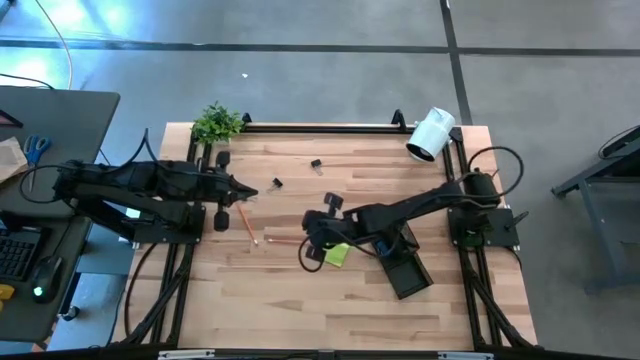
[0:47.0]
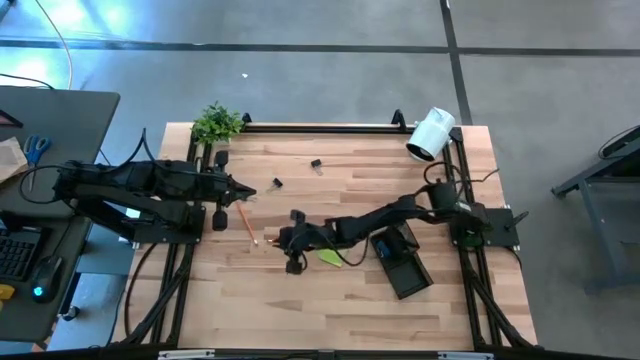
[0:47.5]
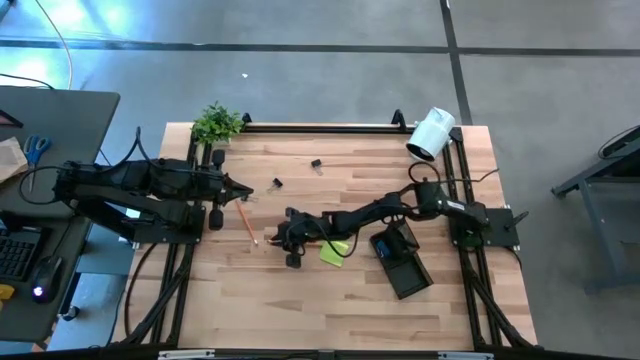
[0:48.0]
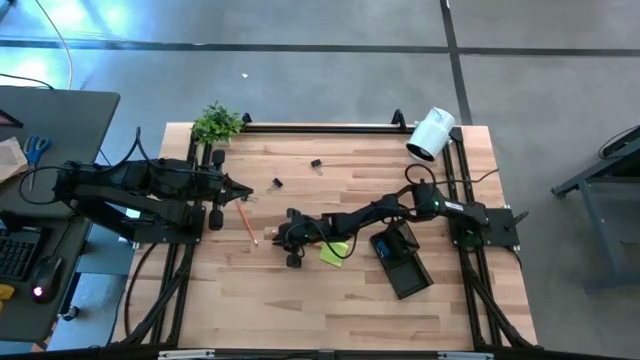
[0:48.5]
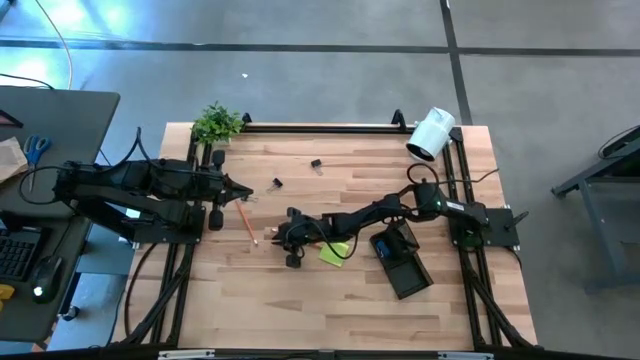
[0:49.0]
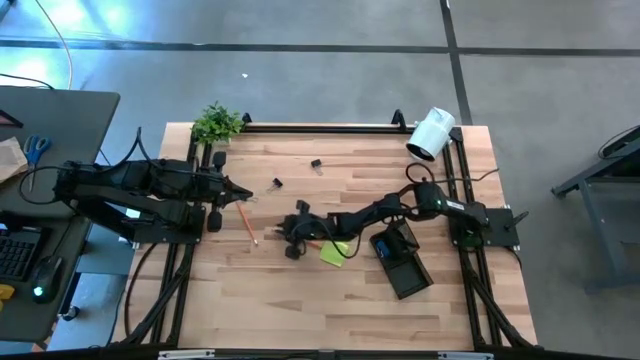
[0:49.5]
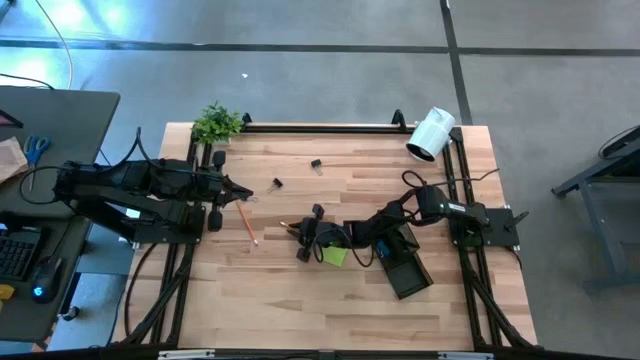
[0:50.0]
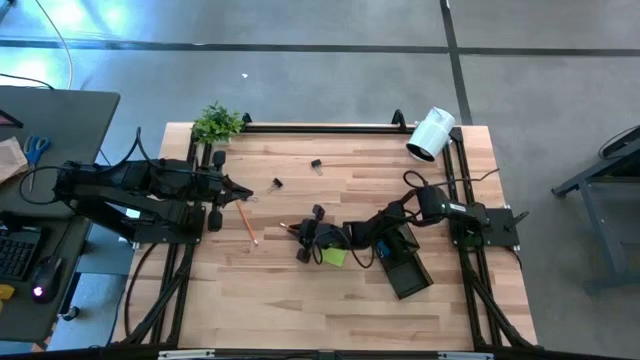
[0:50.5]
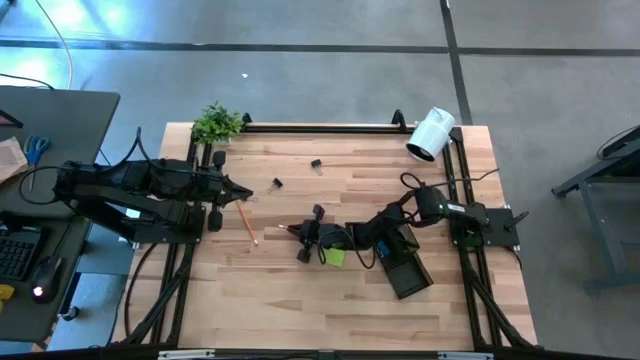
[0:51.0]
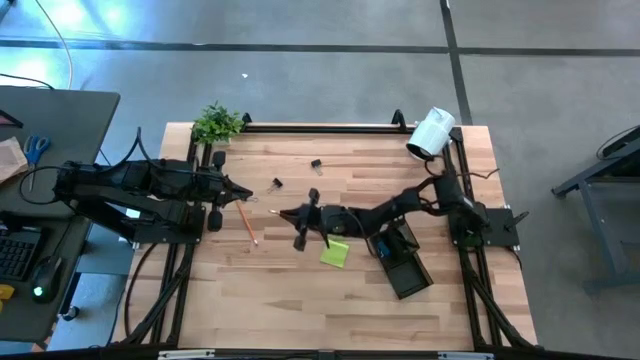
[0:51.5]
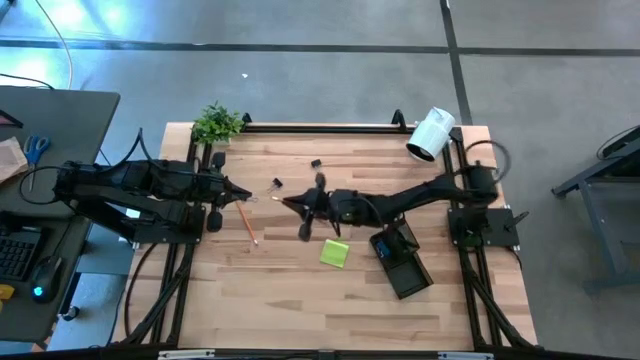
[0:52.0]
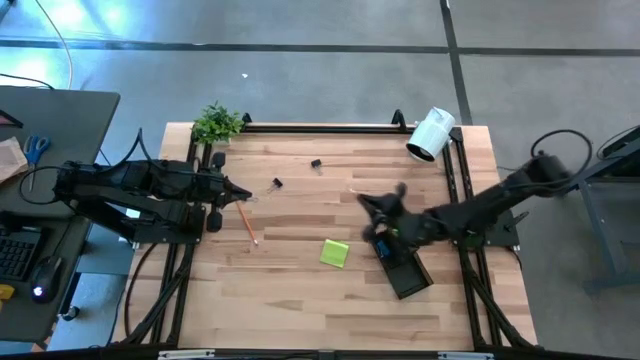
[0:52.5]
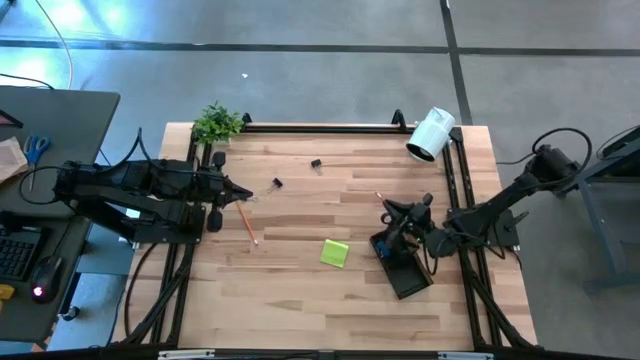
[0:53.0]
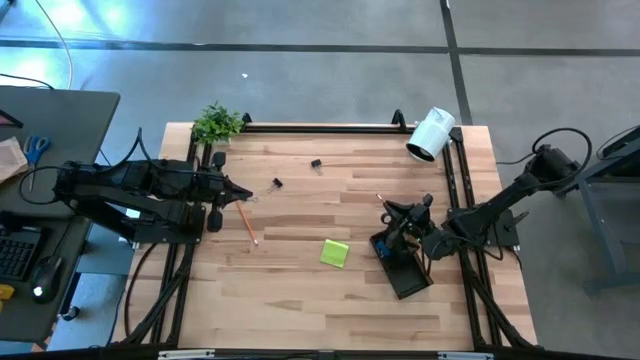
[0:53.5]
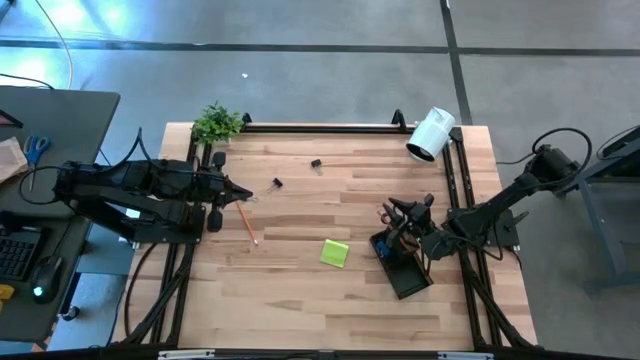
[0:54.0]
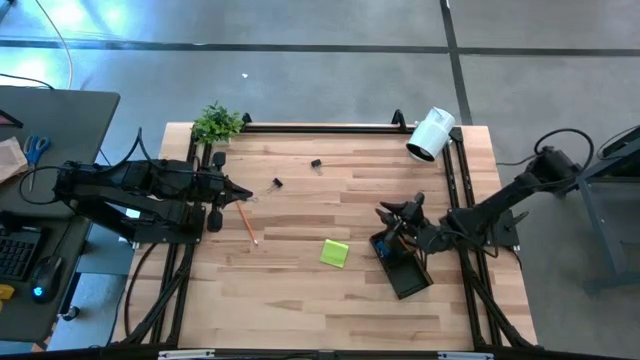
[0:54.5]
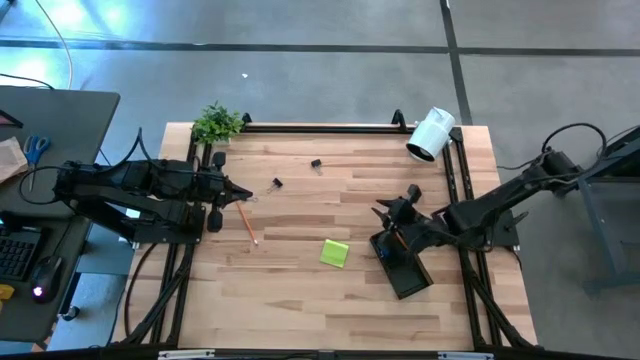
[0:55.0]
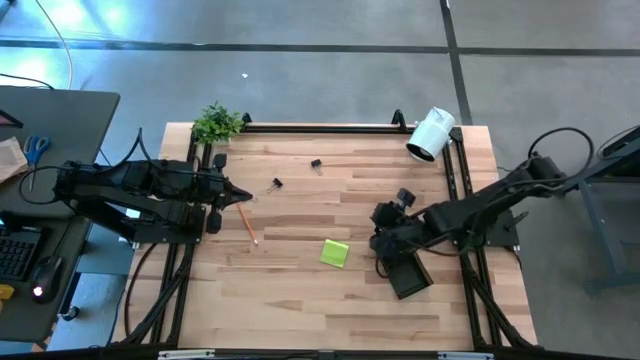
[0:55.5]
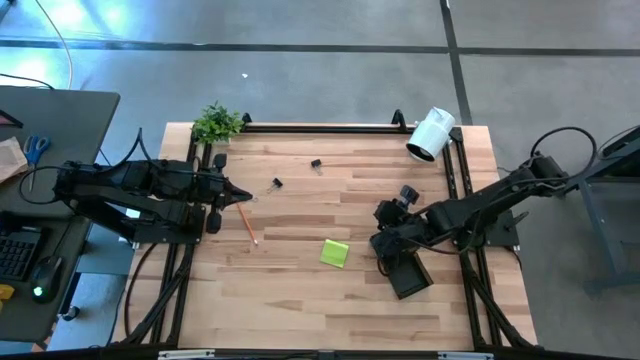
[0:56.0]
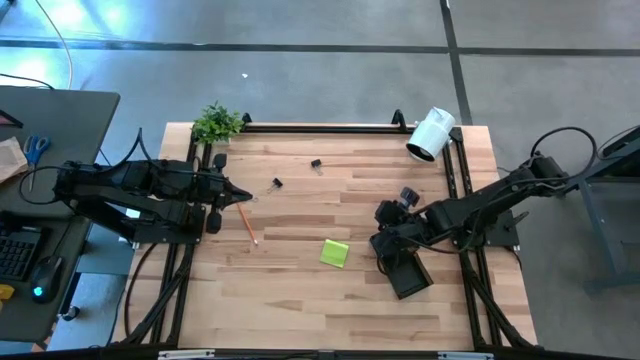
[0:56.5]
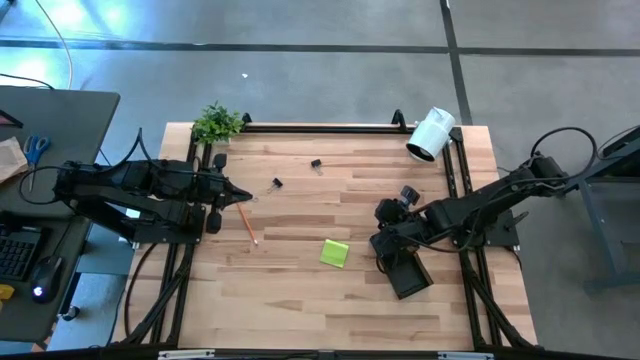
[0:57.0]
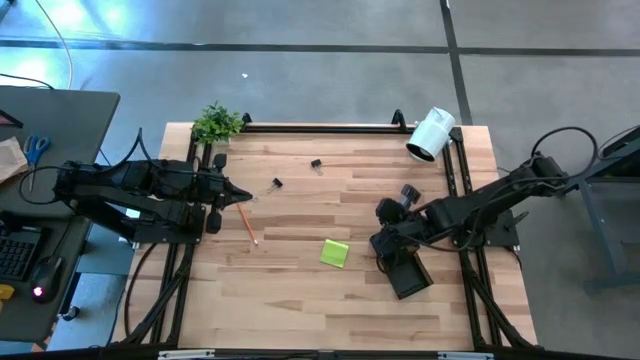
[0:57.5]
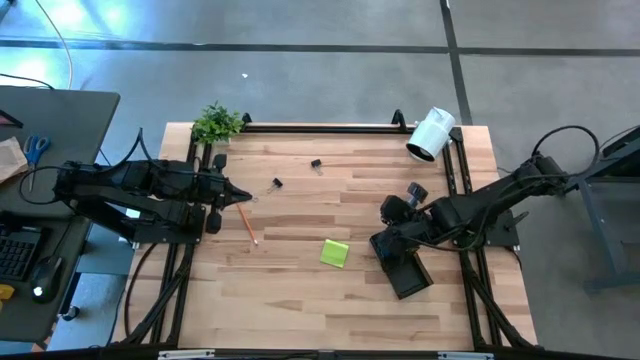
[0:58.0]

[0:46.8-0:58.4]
Task: Pick and place office supplies into organizer
Put the orange pencil into the black desk organizer

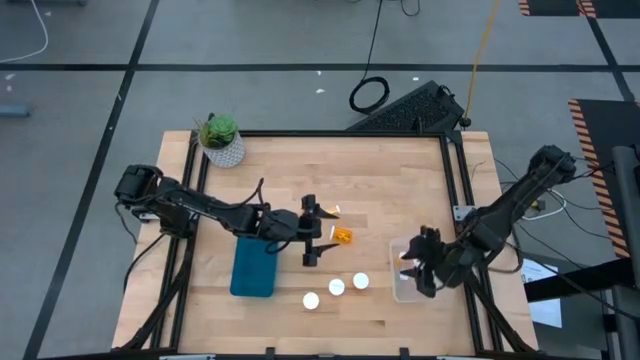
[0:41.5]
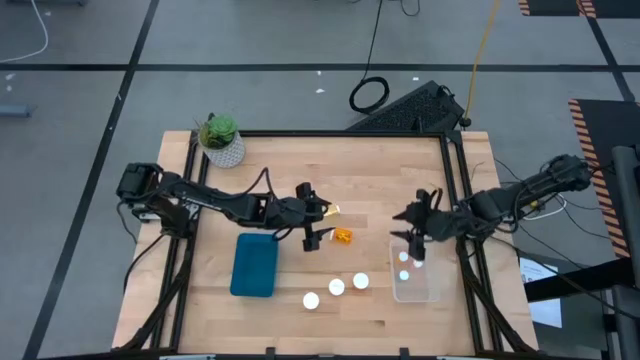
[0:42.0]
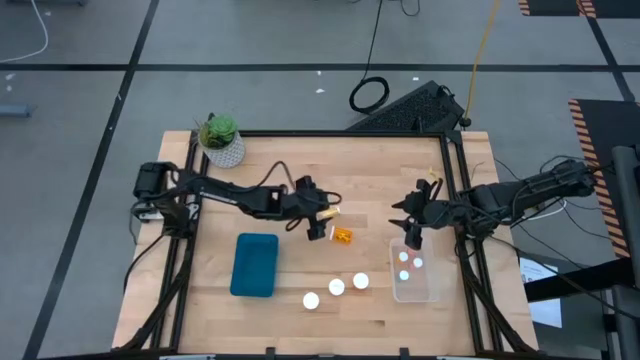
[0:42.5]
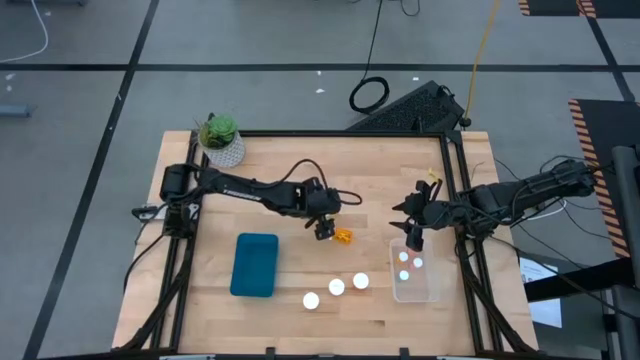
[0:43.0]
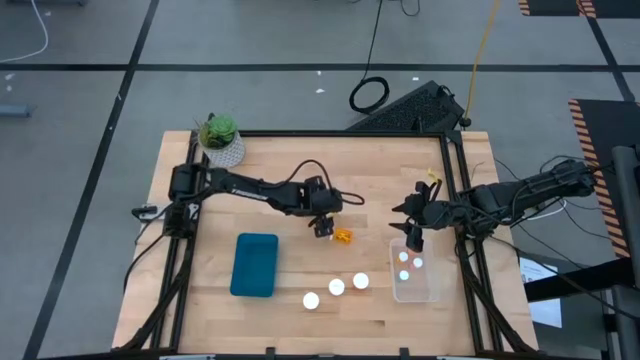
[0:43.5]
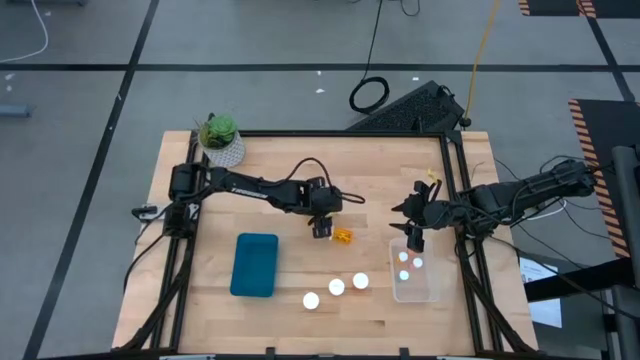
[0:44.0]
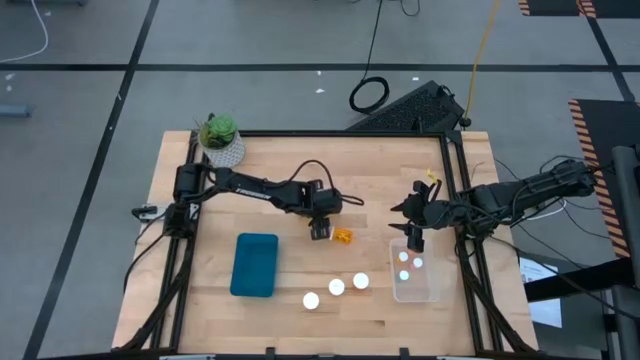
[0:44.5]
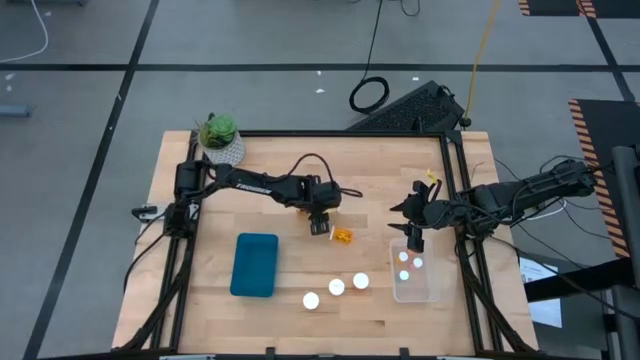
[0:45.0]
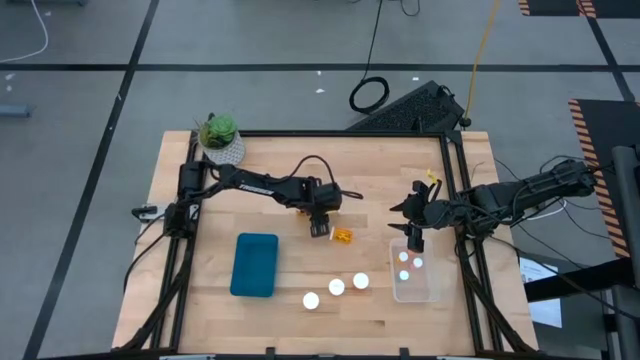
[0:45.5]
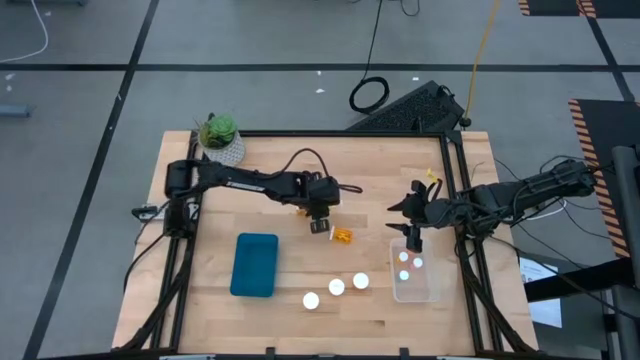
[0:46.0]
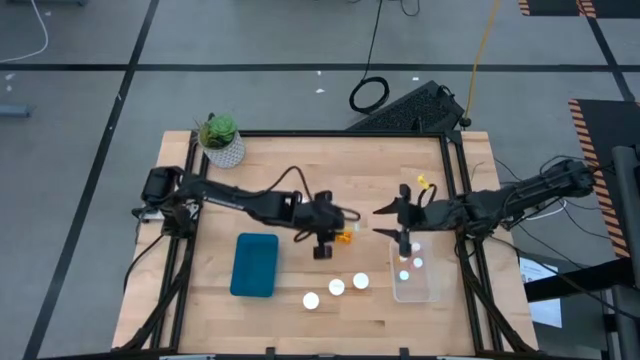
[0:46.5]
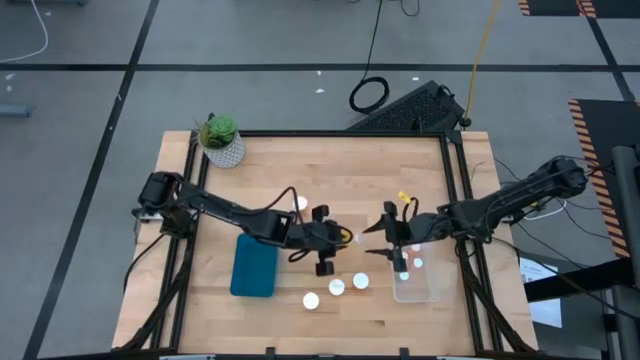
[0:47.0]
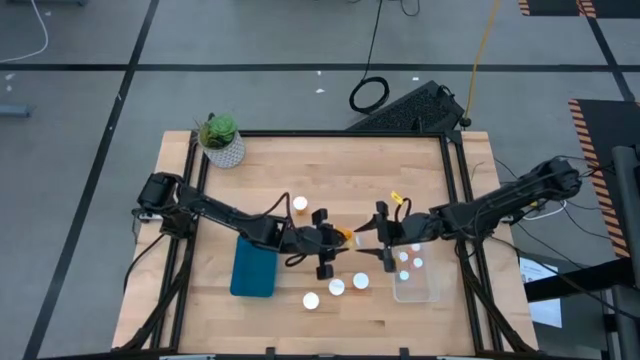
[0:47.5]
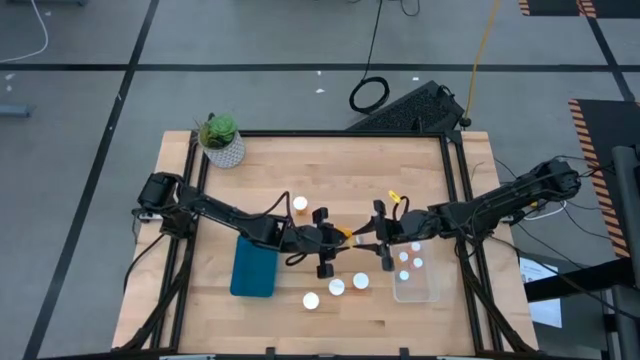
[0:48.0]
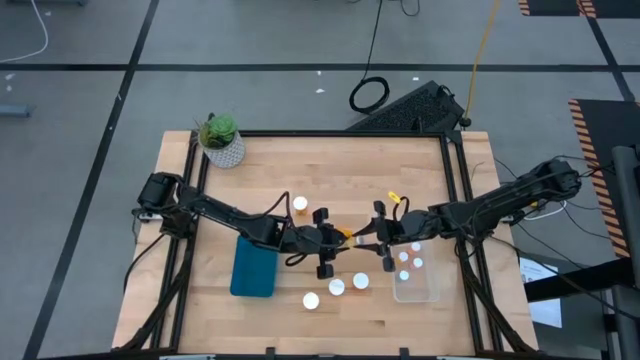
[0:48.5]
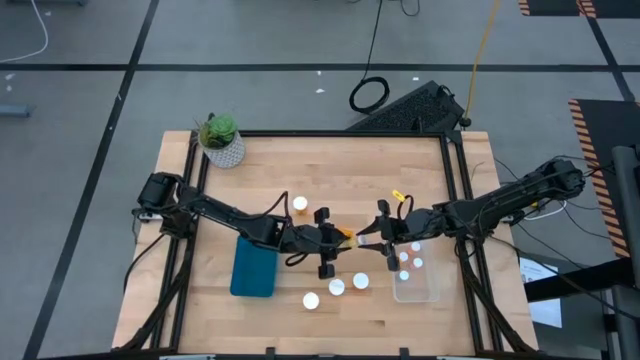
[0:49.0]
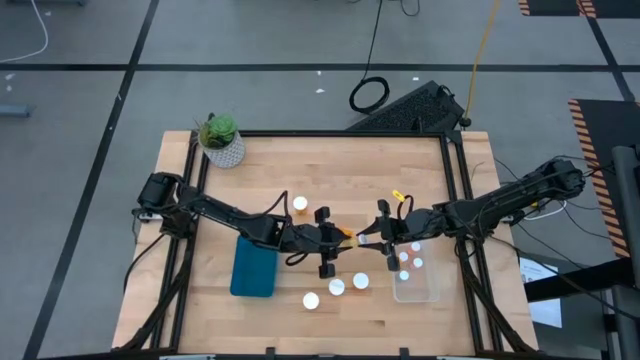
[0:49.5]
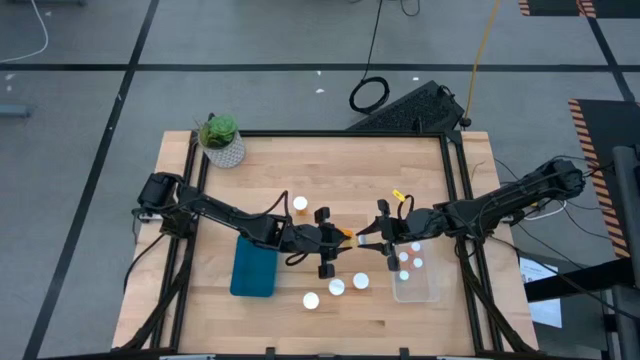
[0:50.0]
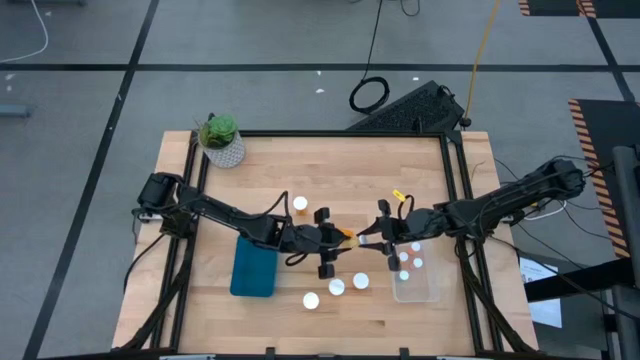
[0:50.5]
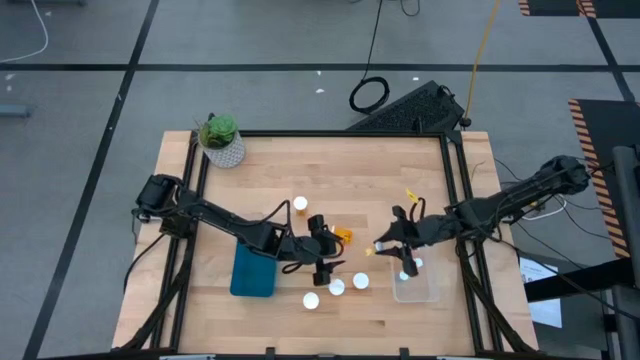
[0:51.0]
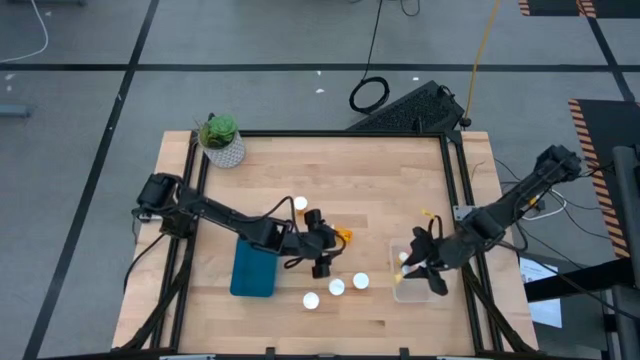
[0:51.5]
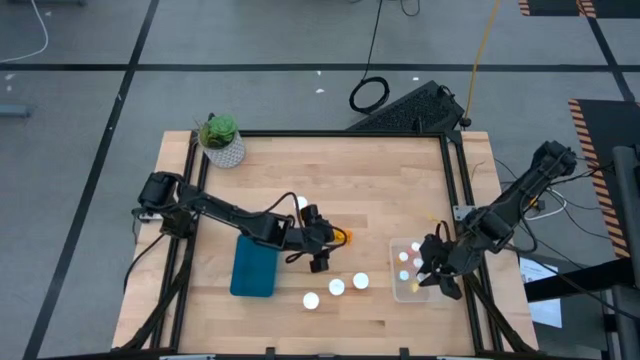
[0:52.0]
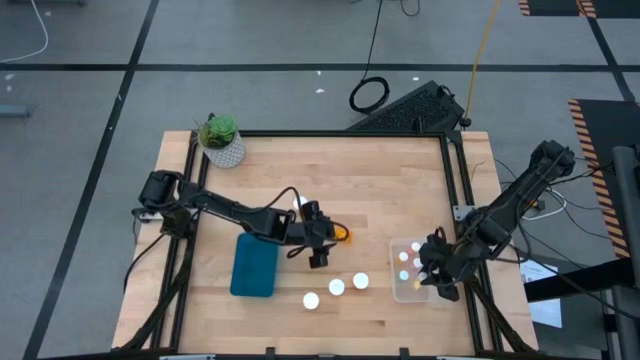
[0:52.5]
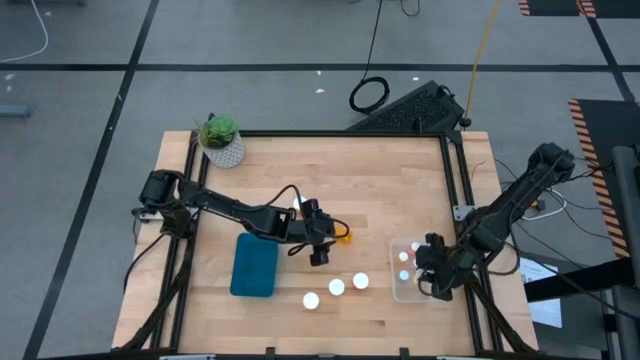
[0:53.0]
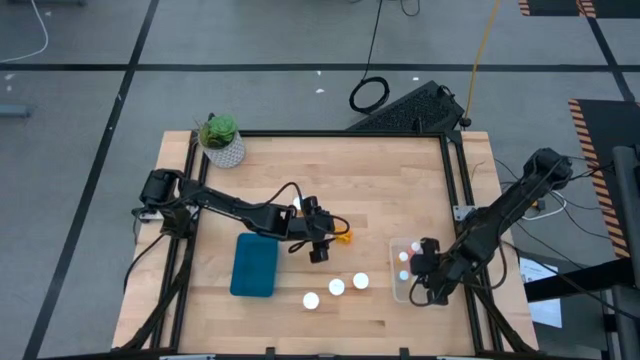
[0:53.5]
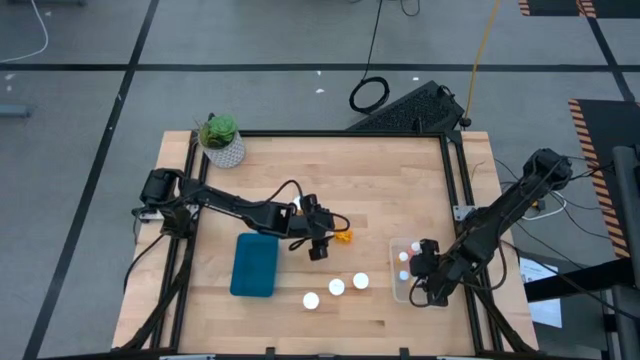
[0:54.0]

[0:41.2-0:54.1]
Task: Pick and place medicine bottles into bin by pill shape (circle, oval)
Put the yellow bottled tablet into the transparent bin
